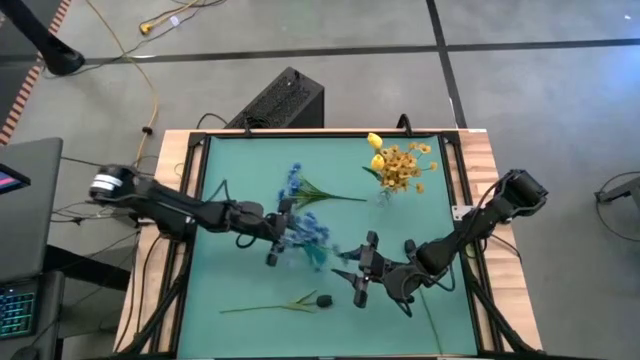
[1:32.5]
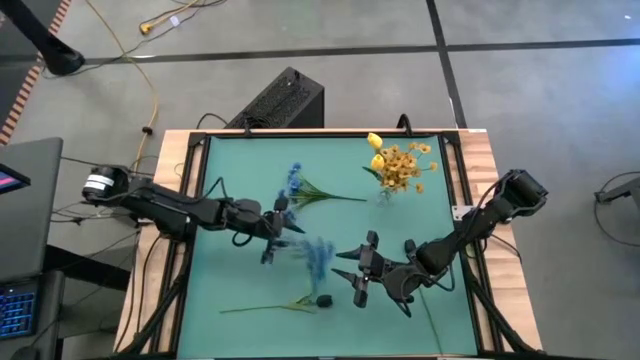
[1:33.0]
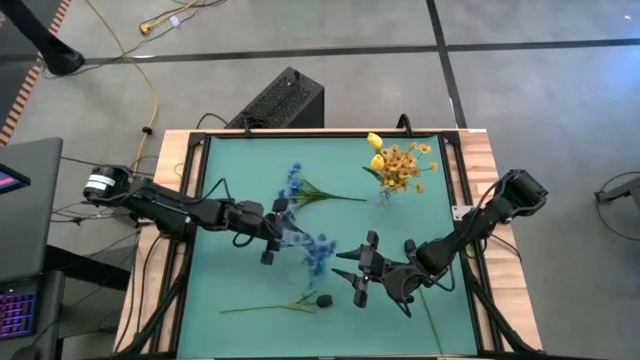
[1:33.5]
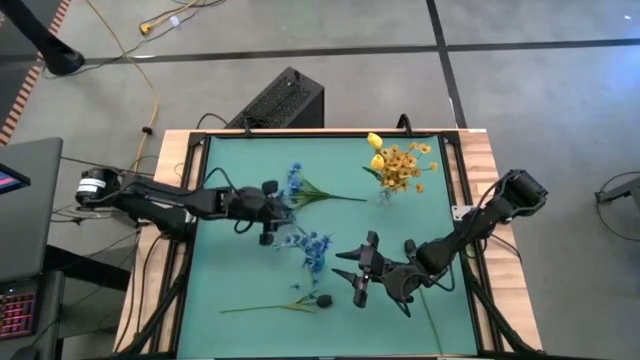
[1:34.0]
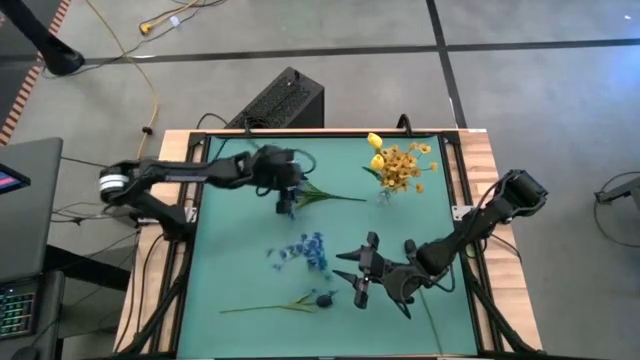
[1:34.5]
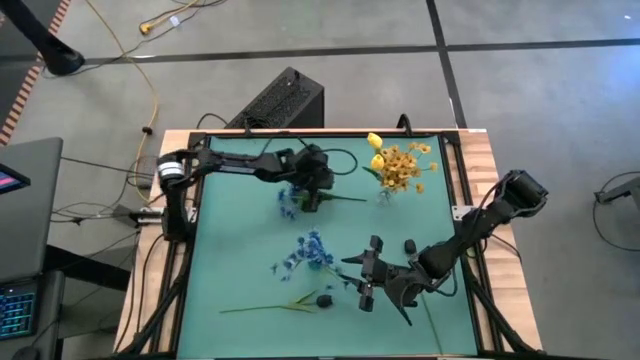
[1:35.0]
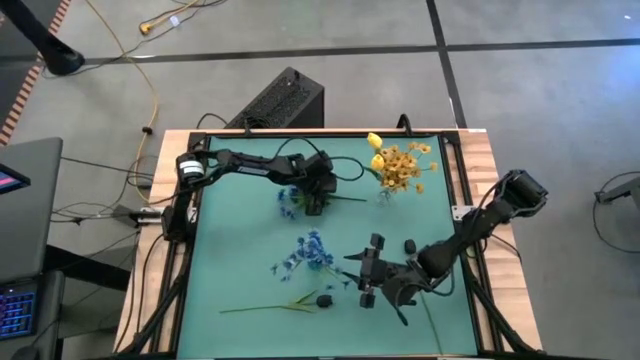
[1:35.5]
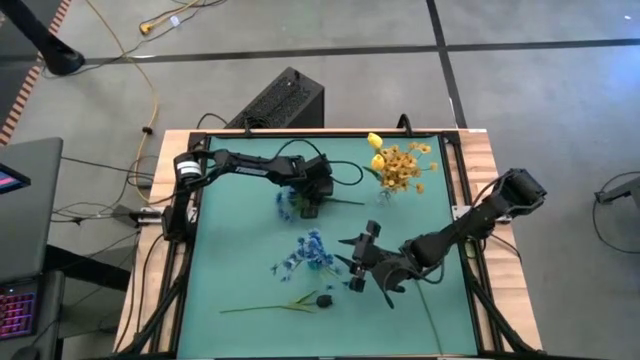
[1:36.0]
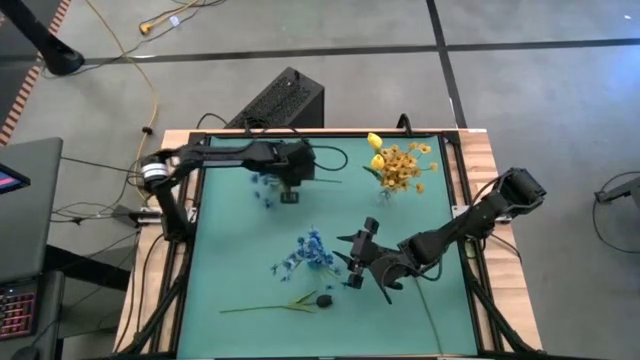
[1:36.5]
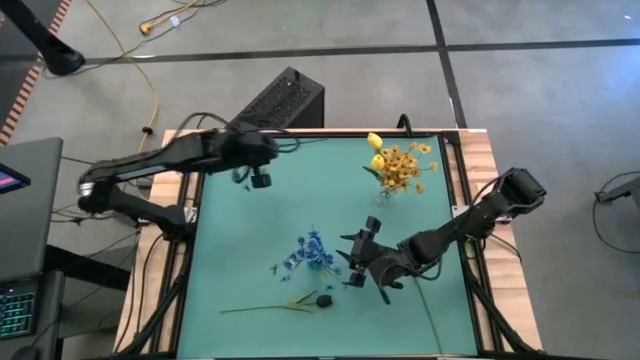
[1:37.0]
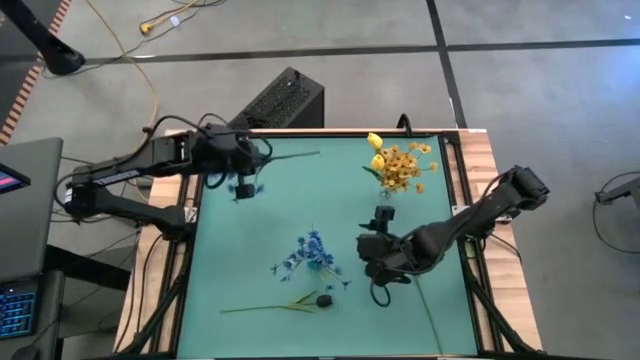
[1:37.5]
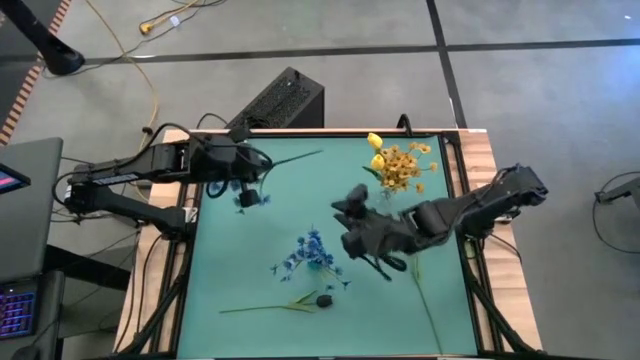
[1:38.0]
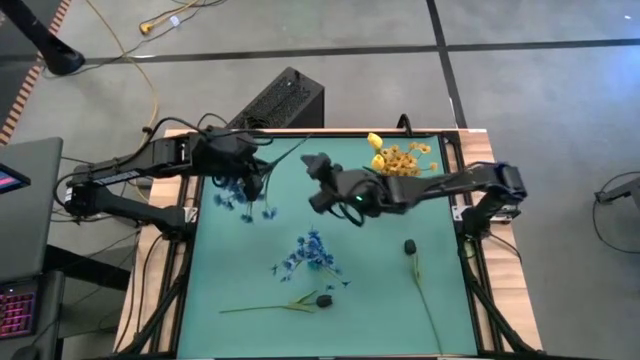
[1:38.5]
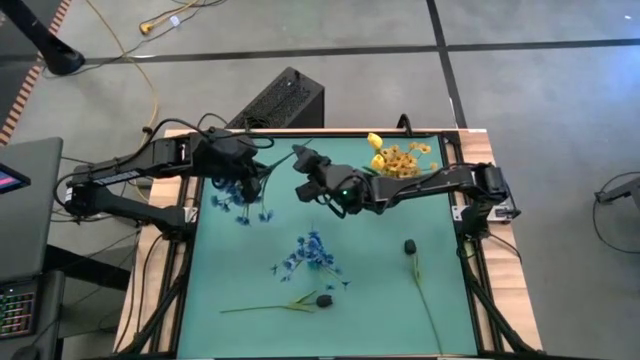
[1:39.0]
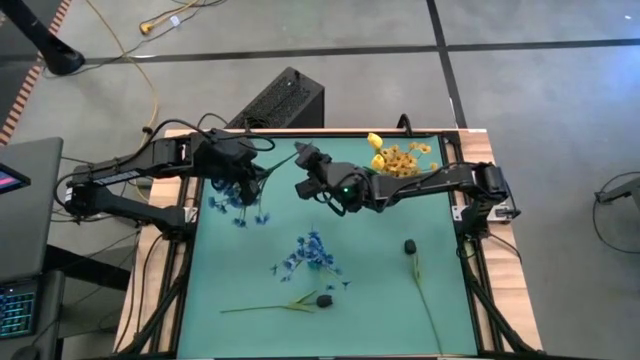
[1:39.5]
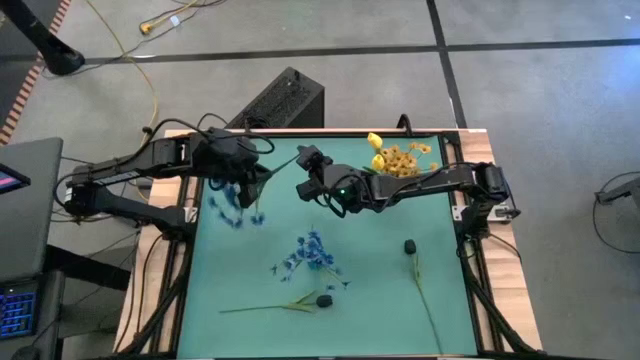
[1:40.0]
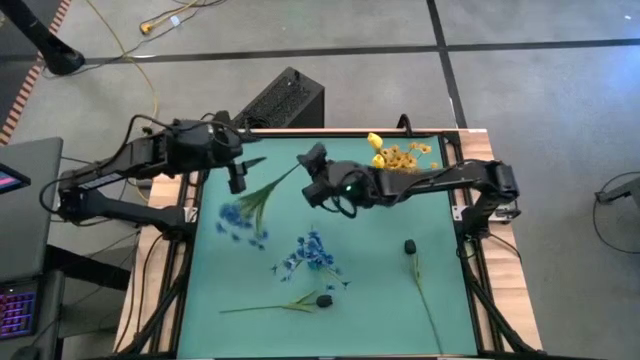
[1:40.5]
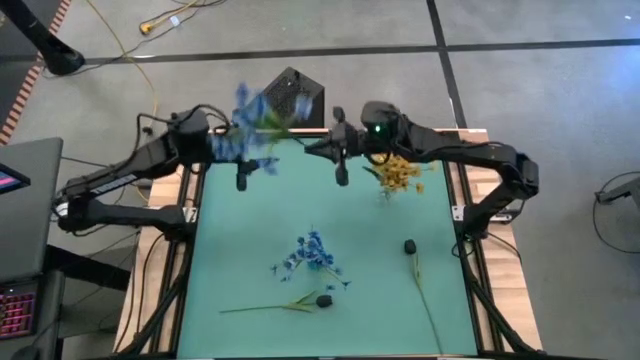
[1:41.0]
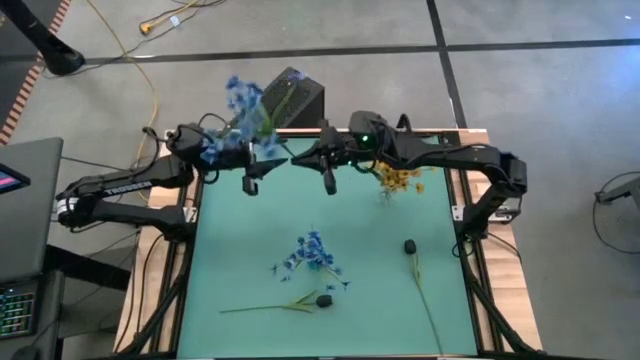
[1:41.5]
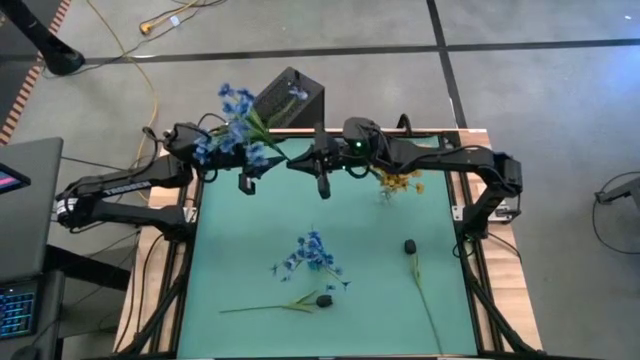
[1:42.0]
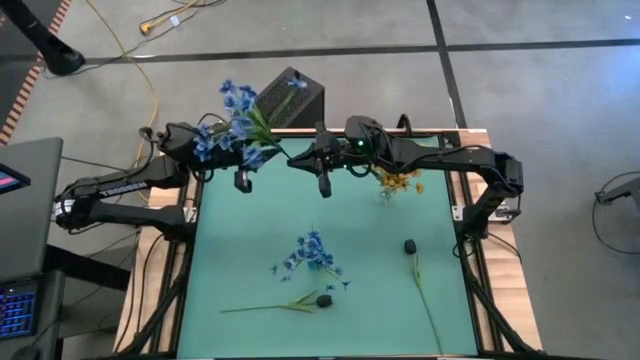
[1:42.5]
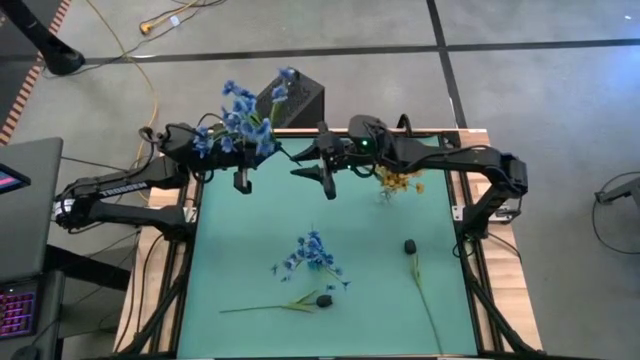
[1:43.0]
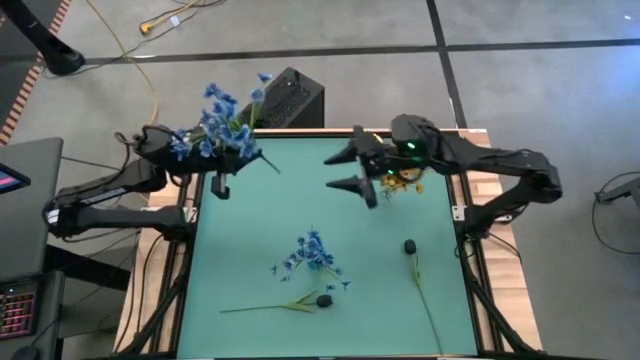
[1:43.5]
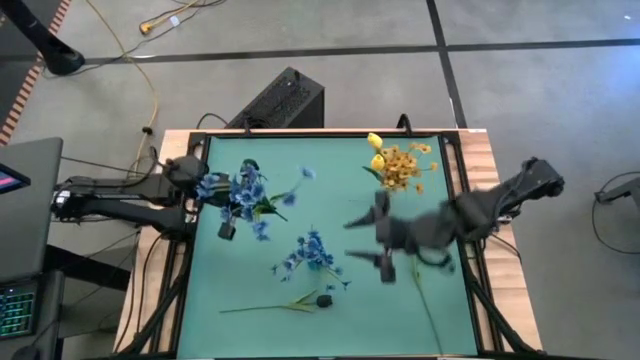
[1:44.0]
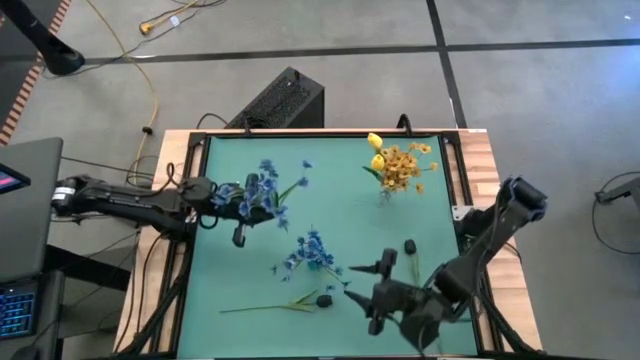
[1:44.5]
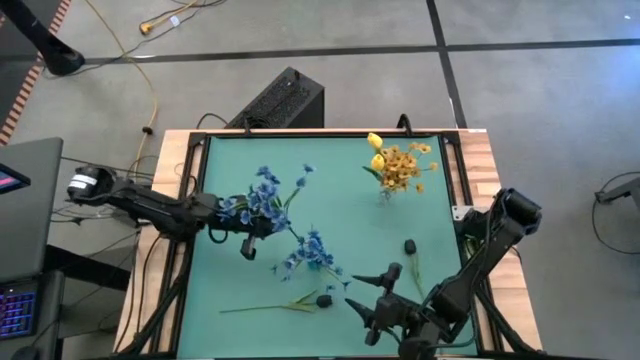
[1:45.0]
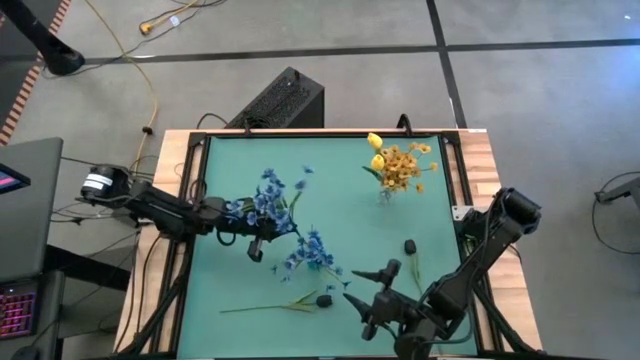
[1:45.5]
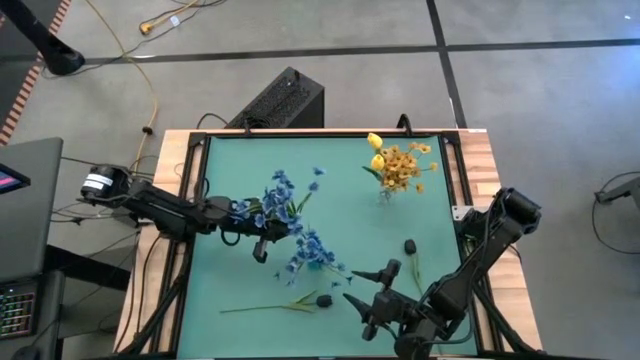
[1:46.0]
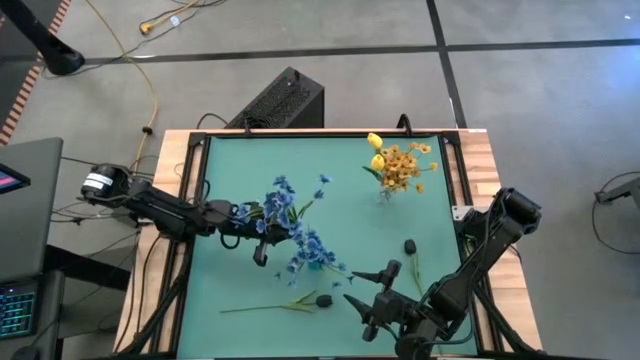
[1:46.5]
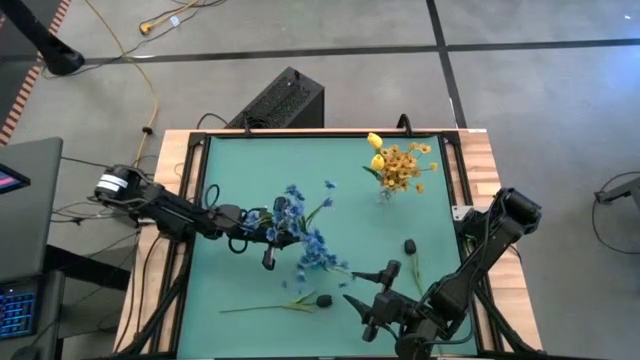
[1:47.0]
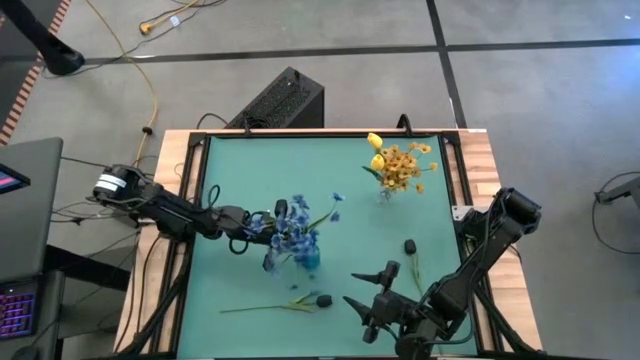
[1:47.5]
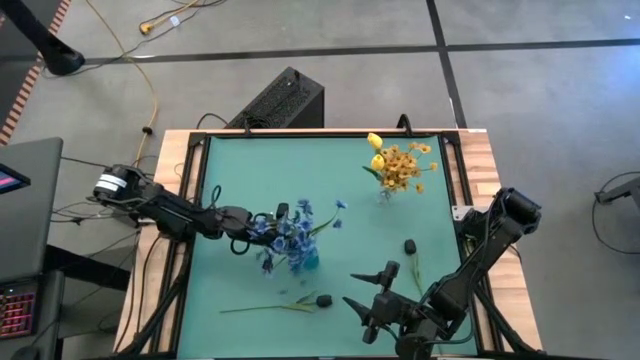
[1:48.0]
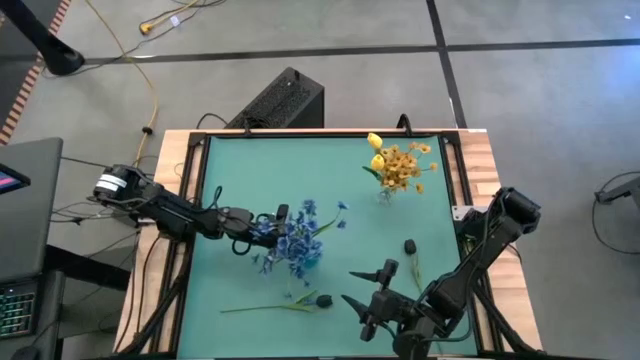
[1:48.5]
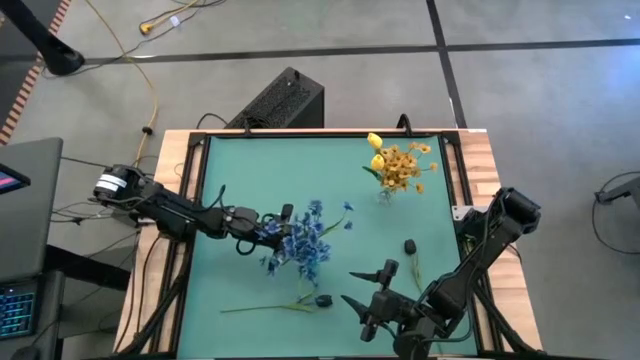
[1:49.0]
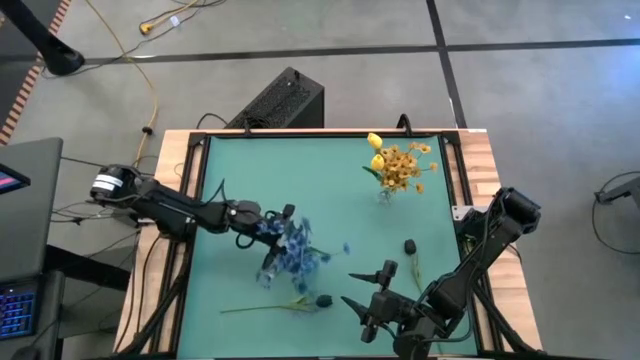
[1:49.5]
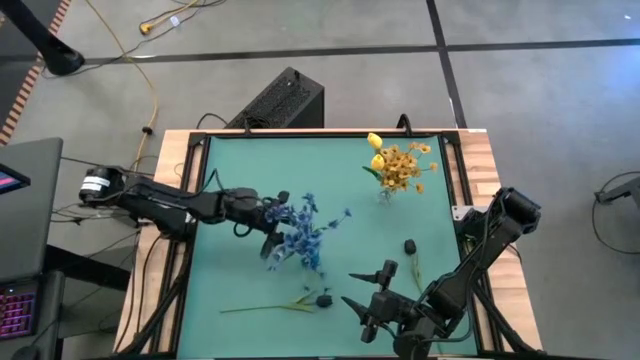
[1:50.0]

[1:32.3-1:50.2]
Task: Sort flowers into vase by color
Put the blue flower into the blue transparent vase

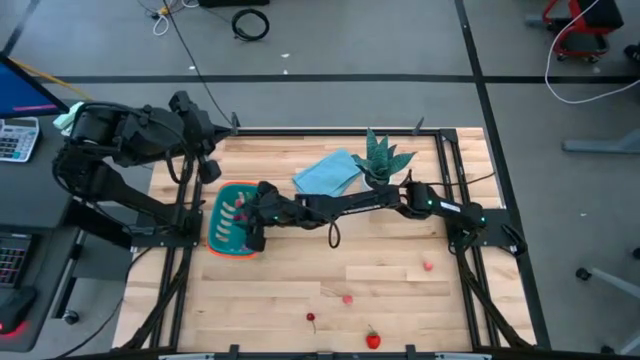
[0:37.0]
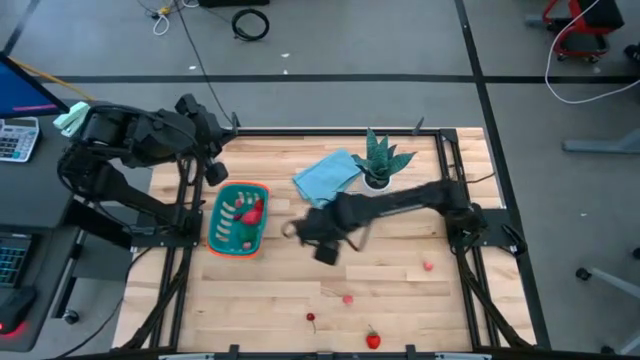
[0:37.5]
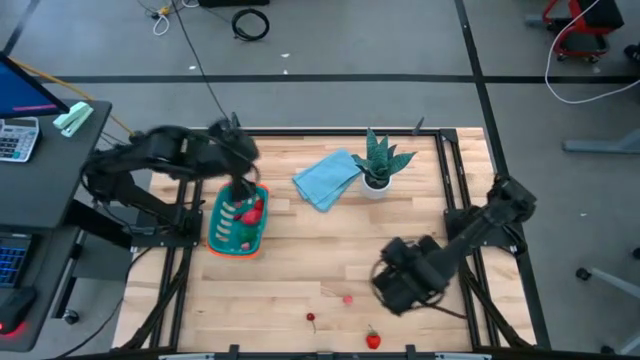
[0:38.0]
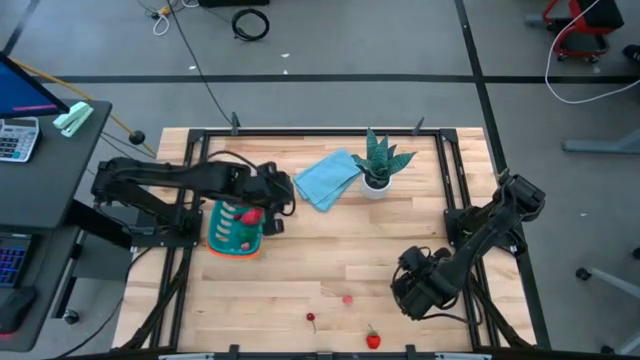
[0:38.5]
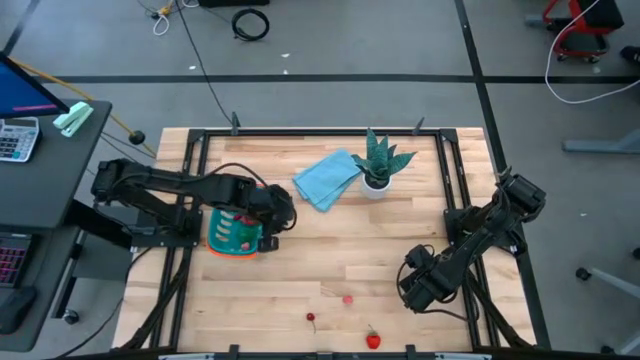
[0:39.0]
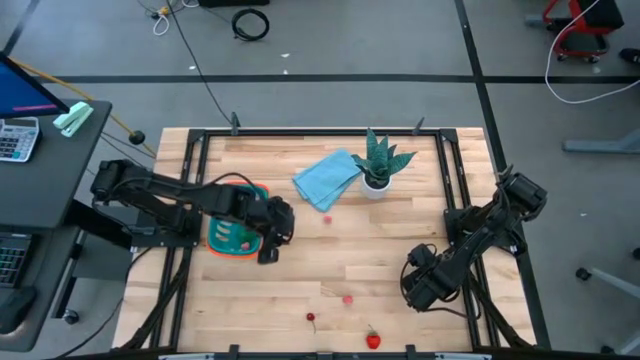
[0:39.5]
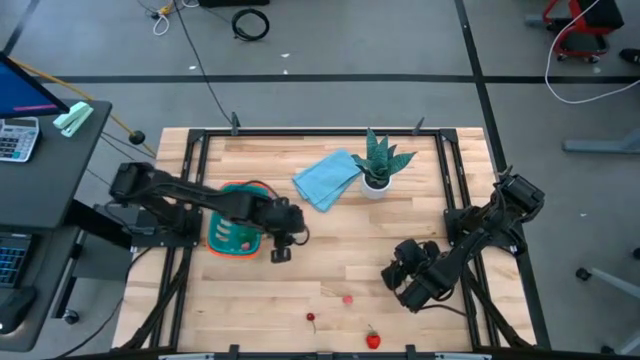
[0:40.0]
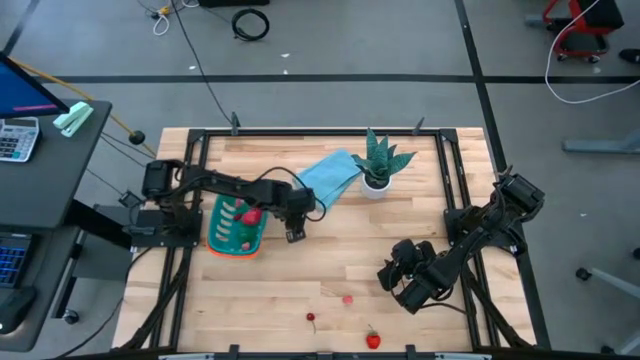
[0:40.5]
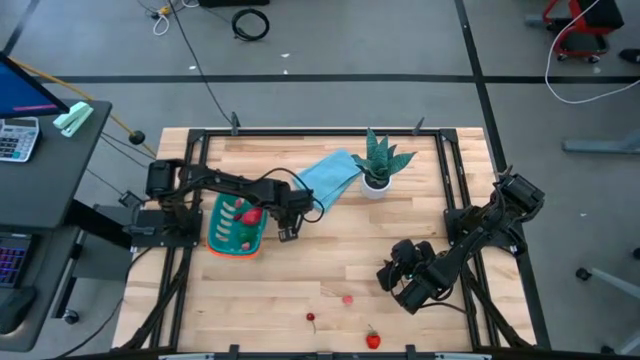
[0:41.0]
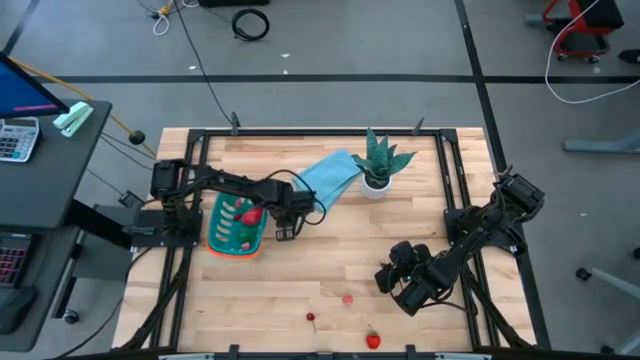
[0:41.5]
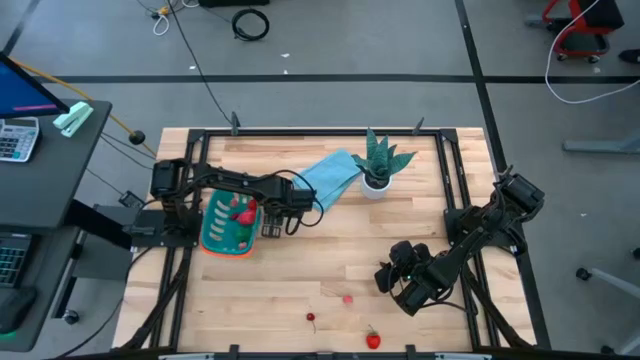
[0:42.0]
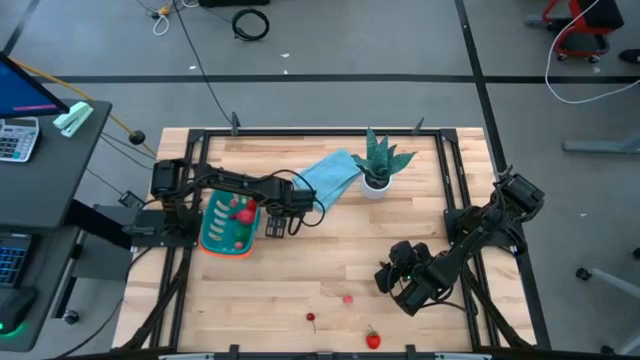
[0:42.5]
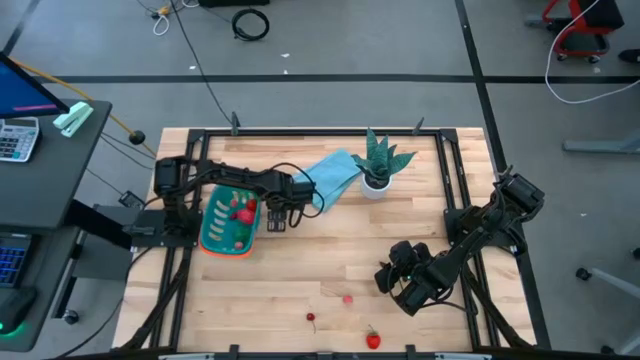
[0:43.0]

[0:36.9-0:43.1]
Task: Pick and placing Produce into tupperware
Put the top pink peach into the blue basket
